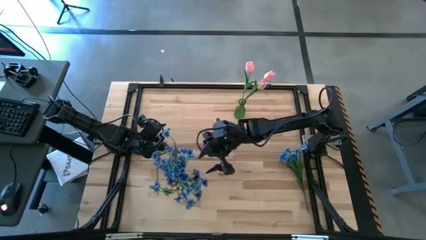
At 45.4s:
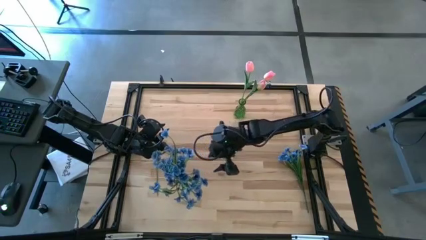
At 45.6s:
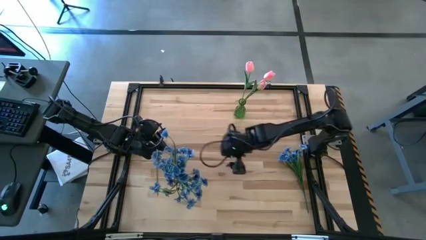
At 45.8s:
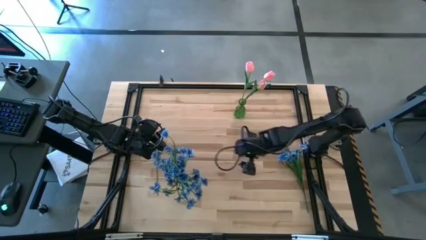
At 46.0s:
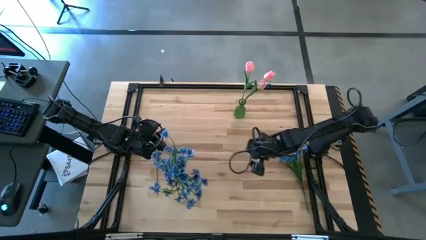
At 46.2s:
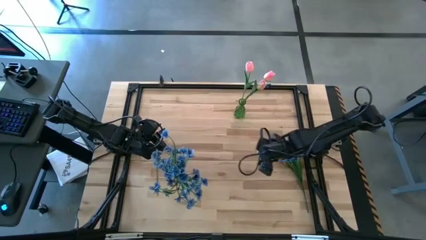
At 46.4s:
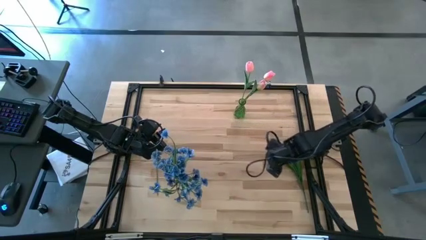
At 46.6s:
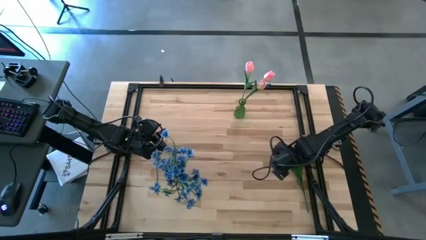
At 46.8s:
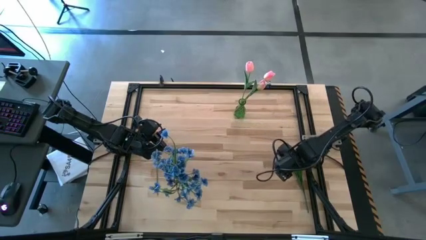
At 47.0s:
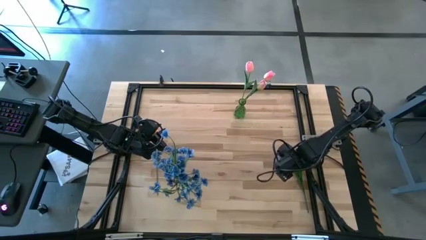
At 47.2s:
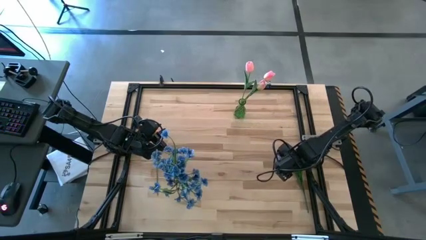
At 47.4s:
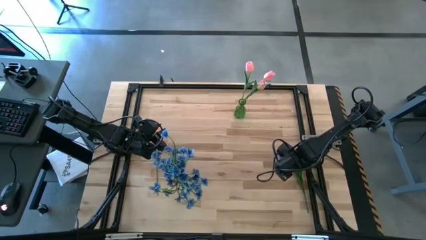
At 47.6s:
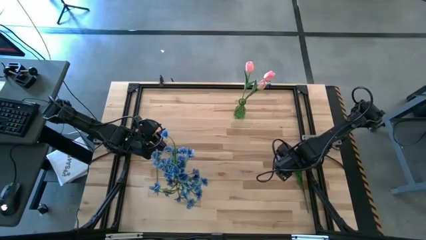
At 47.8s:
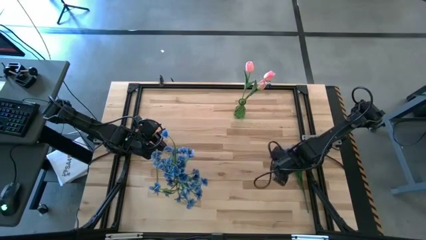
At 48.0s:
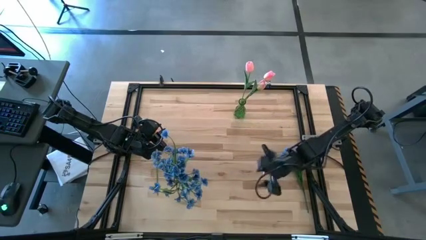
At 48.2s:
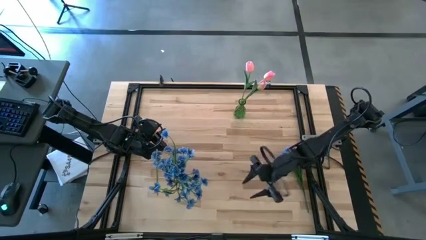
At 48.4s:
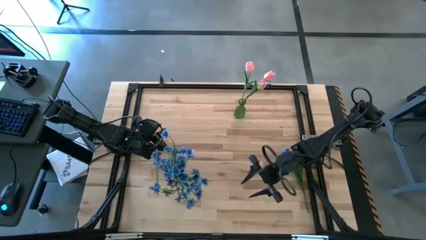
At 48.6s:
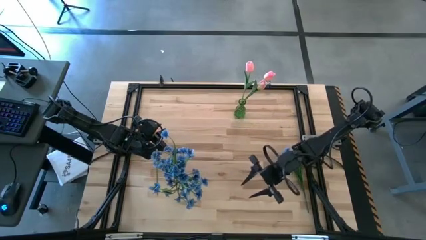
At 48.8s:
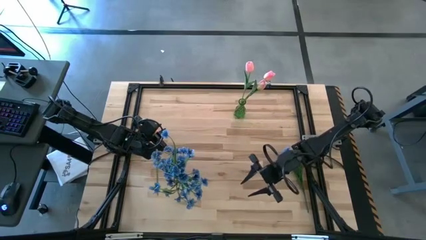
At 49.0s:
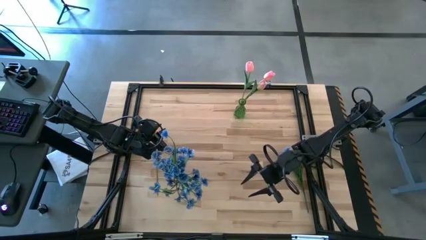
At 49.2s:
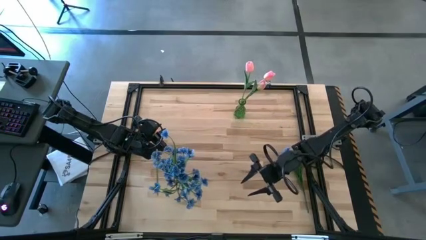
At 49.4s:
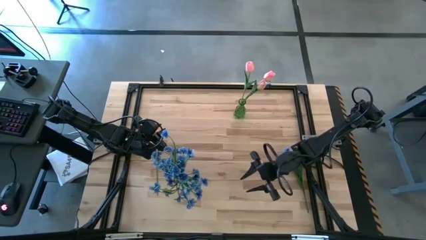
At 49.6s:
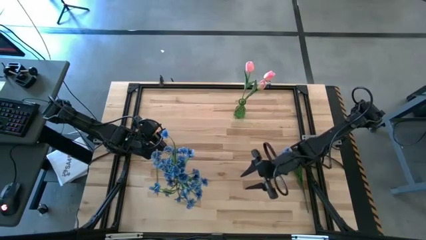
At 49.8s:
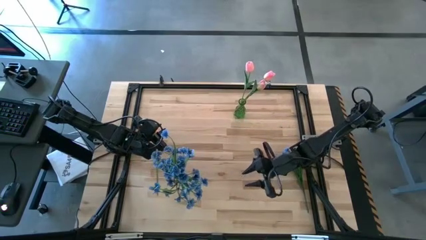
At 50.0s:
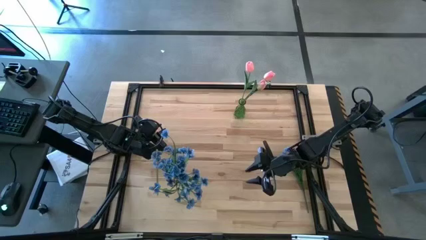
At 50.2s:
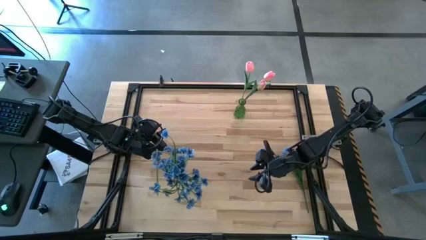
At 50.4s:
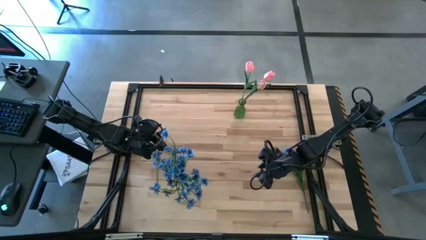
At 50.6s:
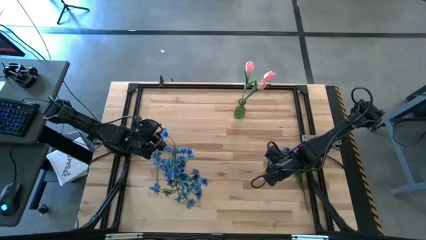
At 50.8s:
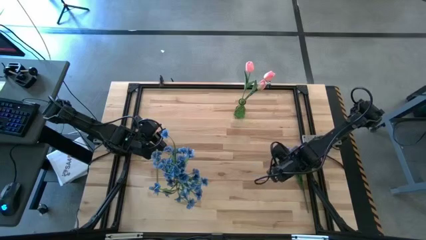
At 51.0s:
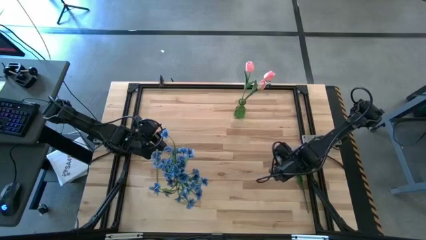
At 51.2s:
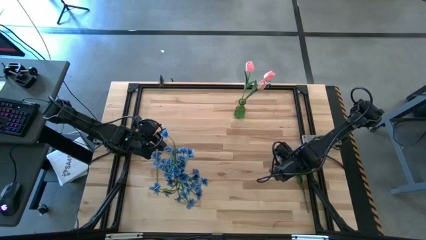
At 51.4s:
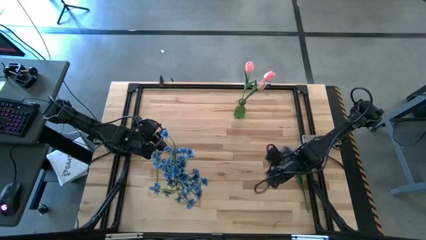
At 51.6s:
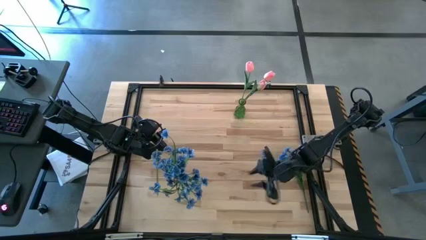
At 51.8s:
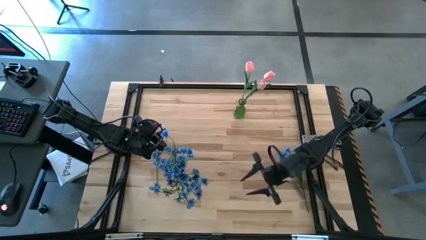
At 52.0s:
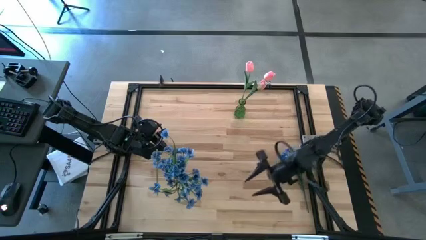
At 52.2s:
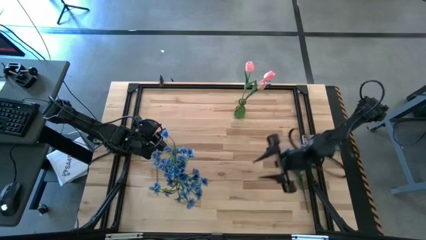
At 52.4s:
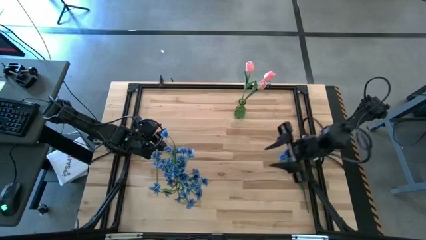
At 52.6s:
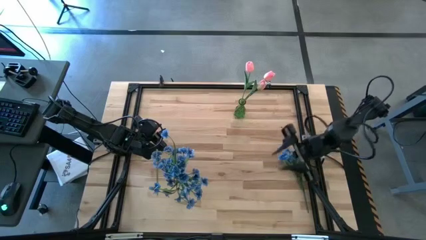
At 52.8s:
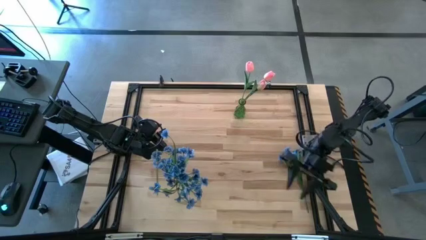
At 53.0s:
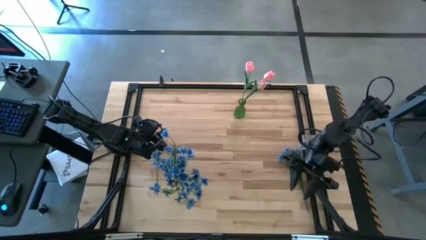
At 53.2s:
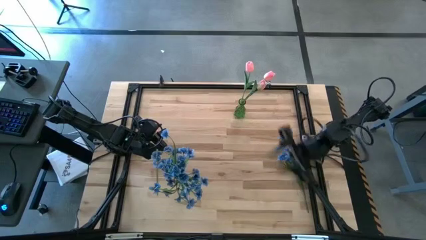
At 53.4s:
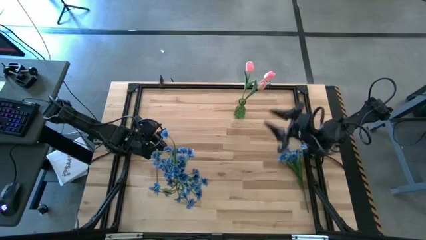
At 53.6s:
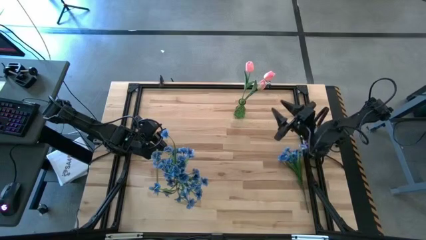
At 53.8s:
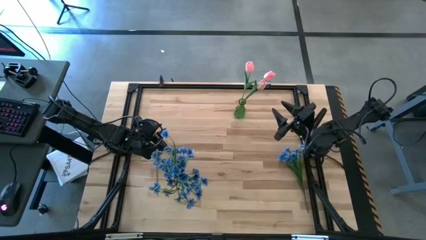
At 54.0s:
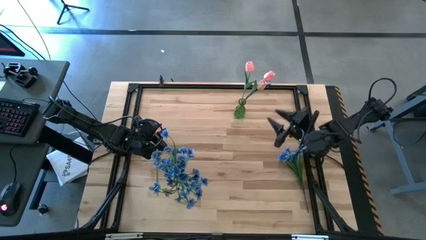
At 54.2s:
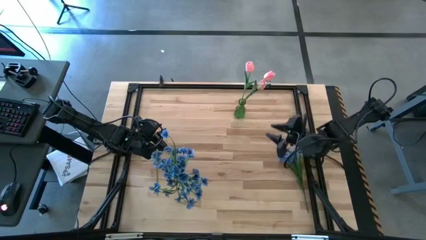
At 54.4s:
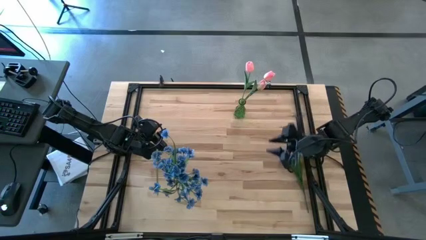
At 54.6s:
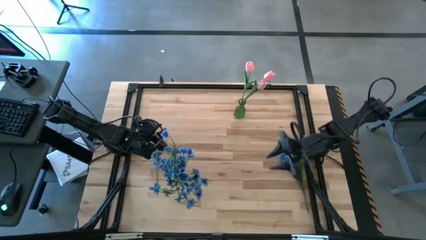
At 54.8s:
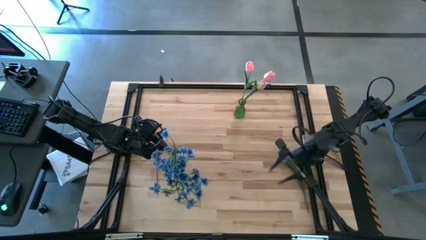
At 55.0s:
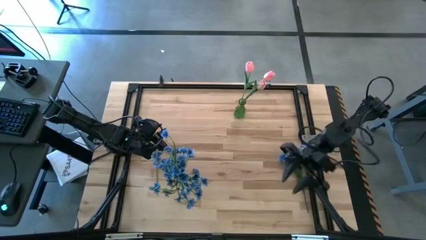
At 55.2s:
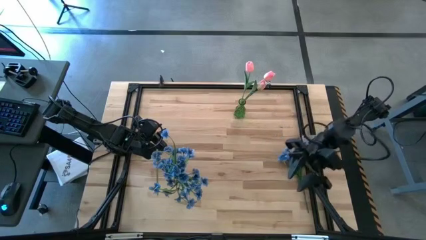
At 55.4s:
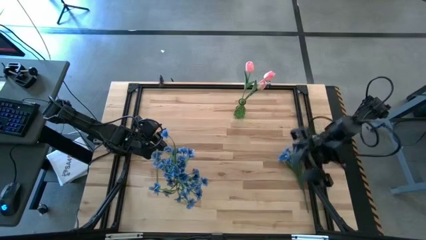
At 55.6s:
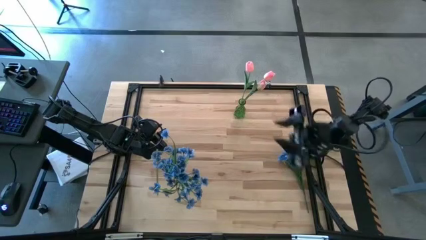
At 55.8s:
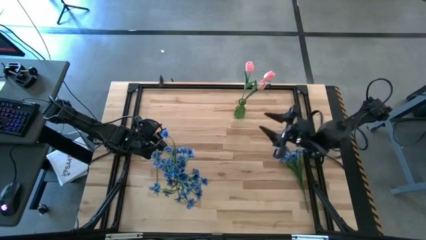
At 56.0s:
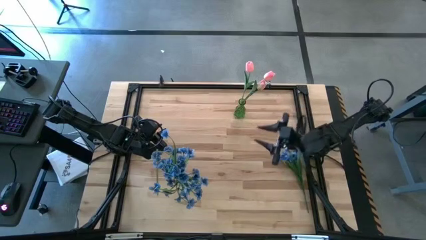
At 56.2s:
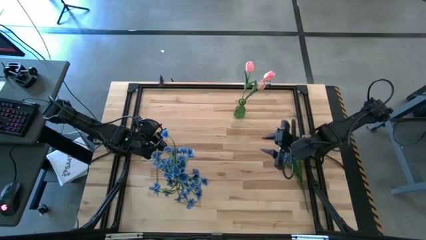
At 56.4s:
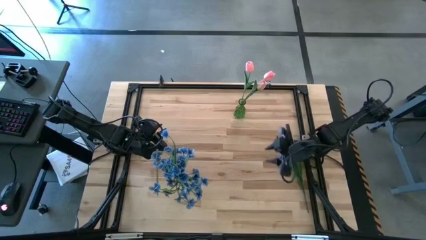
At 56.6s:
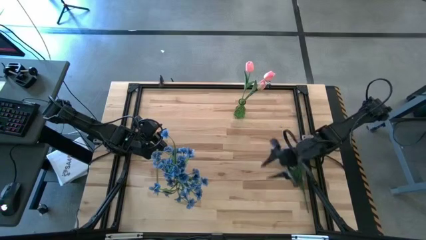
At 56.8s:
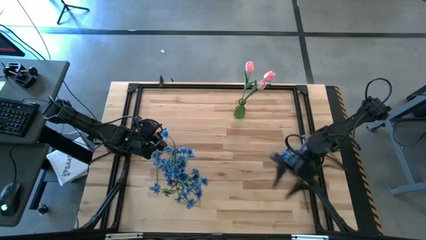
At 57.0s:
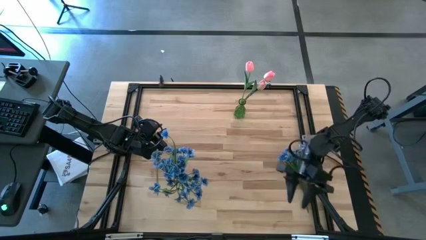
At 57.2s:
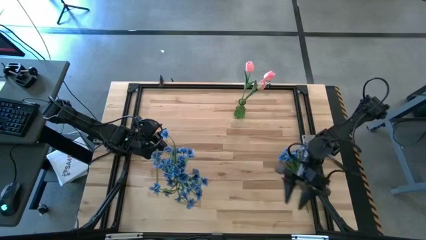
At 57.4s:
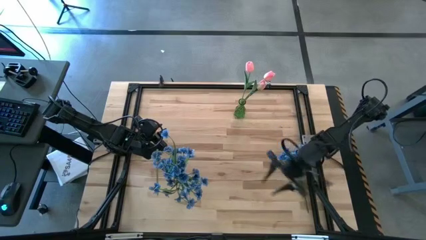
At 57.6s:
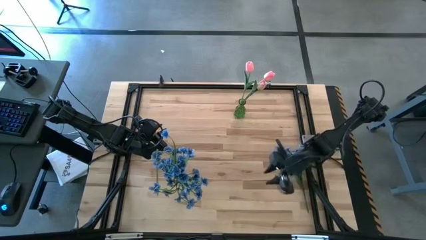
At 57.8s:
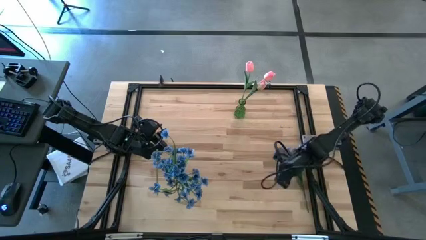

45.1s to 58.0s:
Task: Sort flowers into vase by color
Put the blue flowers into the transparent vase

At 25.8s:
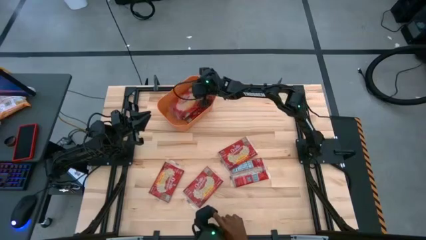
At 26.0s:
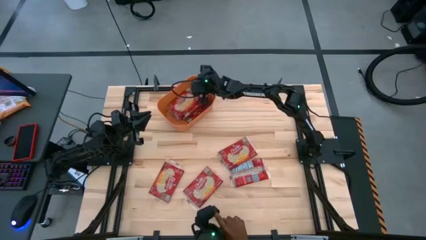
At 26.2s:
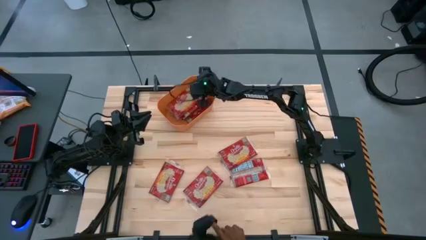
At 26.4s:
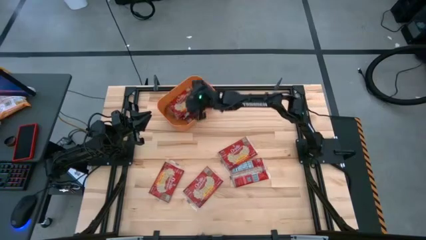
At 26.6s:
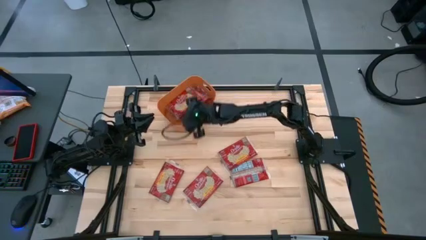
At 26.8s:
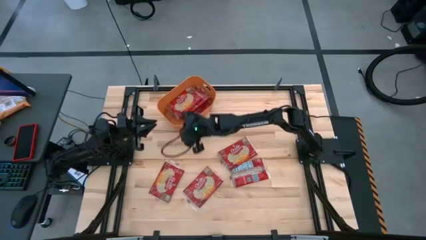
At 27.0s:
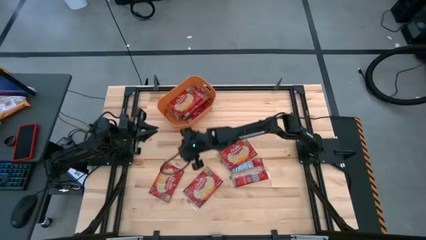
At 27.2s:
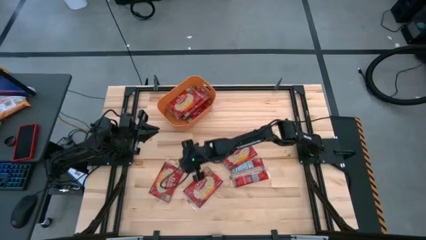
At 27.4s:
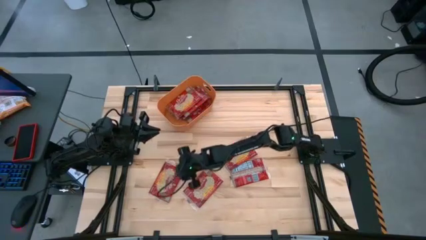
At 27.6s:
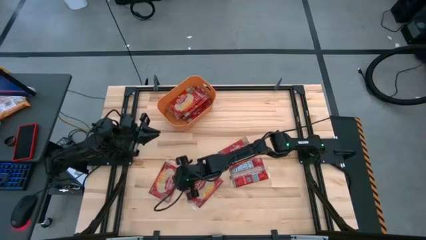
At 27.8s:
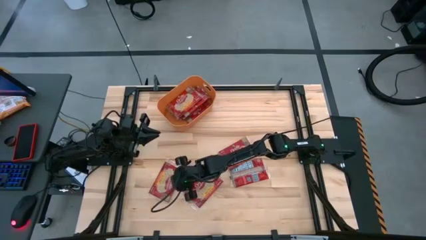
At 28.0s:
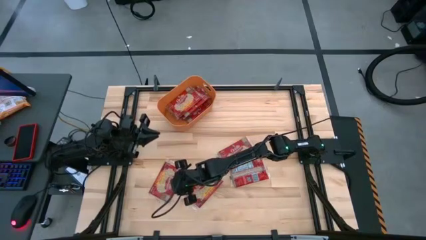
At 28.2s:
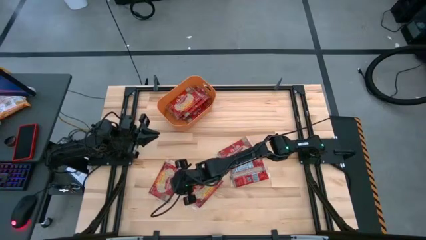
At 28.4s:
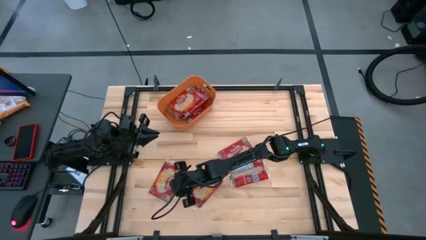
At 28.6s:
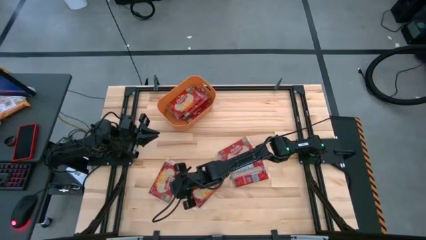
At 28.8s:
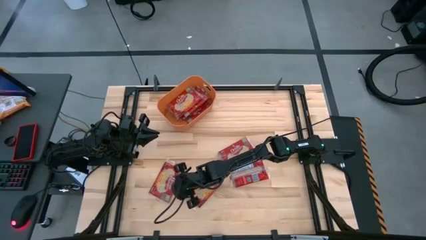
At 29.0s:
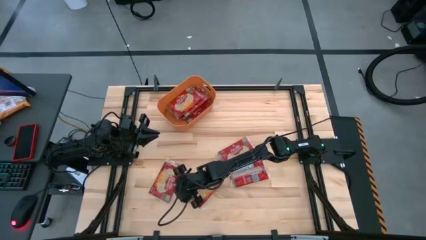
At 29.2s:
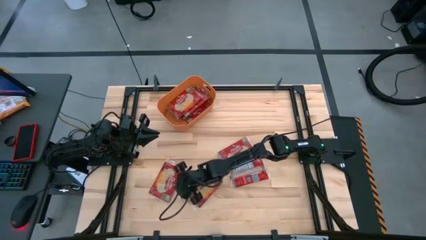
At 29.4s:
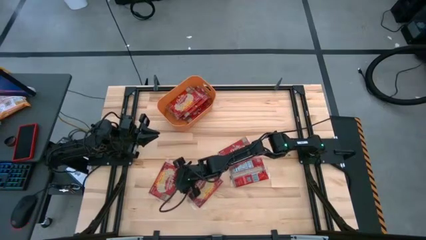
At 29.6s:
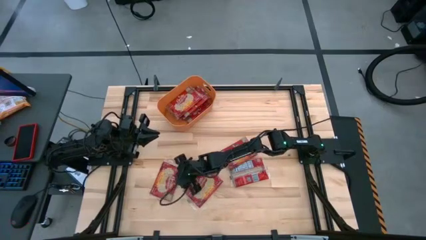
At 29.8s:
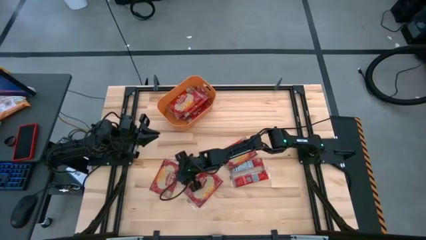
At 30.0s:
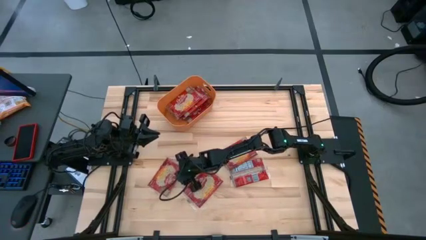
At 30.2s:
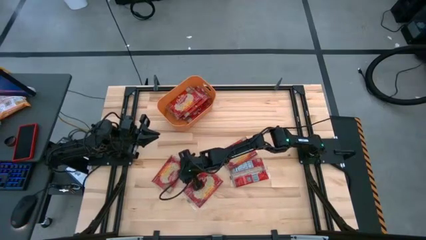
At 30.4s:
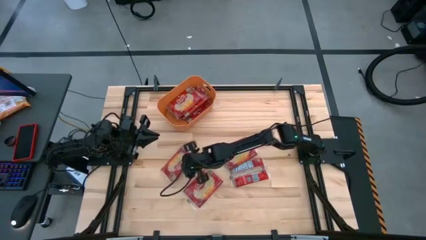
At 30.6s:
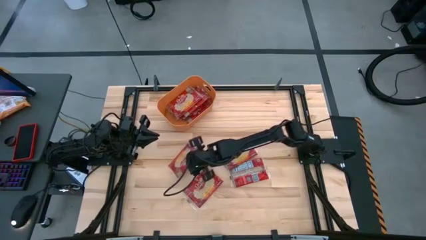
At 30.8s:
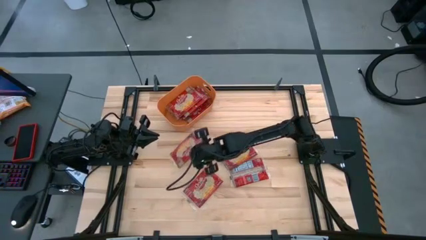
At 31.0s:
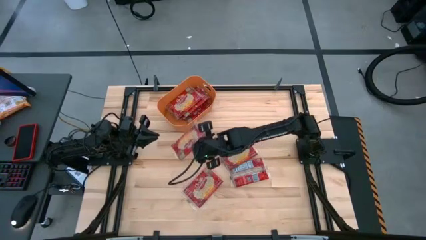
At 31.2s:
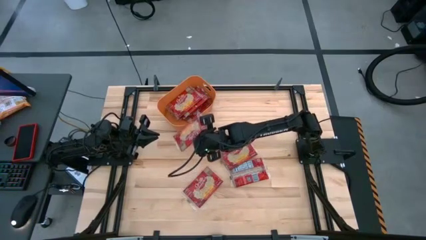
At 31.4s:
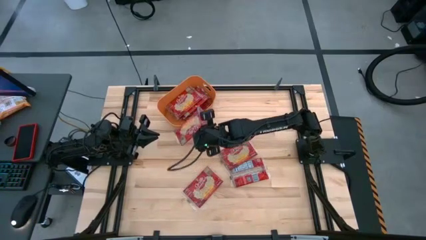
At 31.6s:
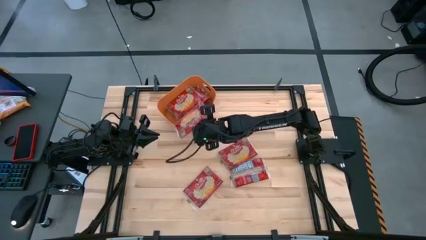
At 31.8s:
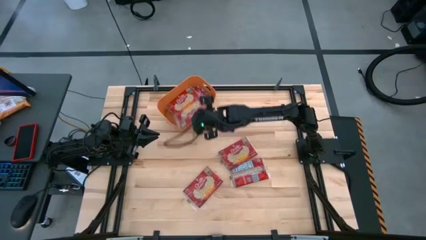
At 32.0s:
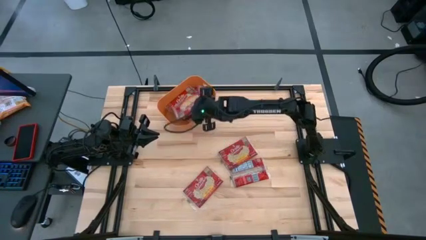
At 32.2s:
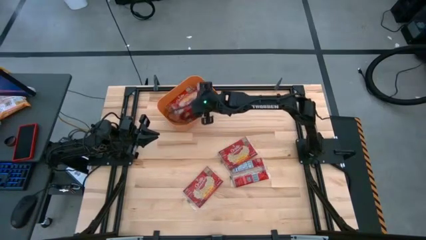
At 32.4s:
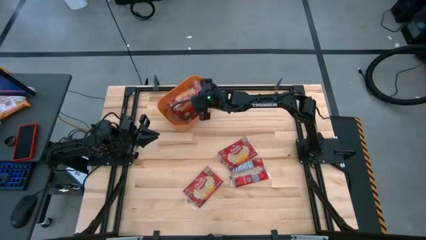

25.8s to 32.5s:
Task: Sort popcorn bags into baskets
Put the red popcorn bag into the orange bin
